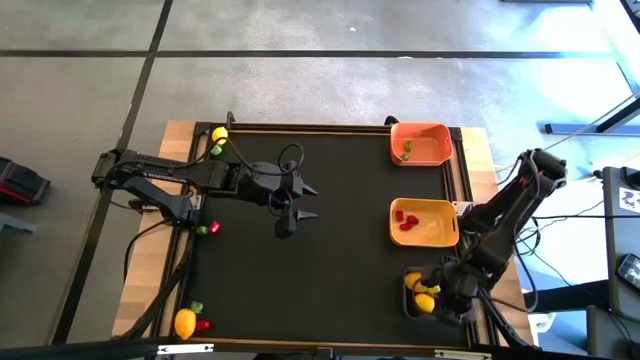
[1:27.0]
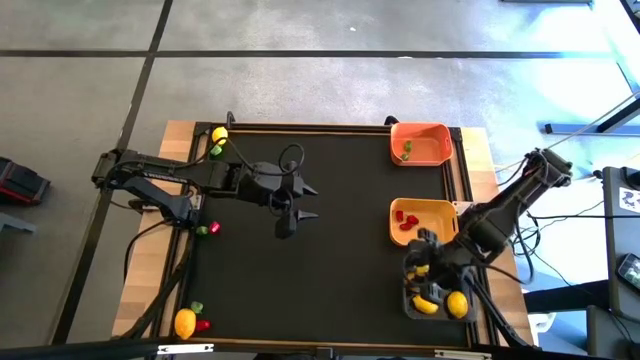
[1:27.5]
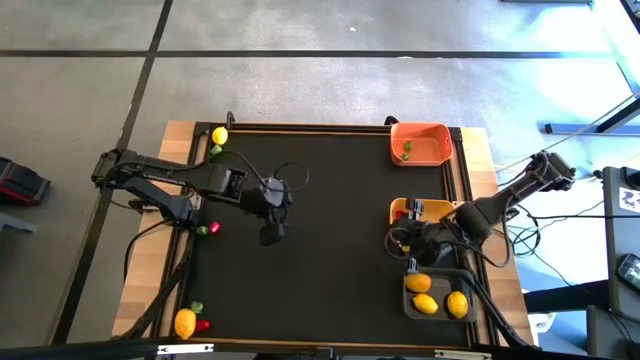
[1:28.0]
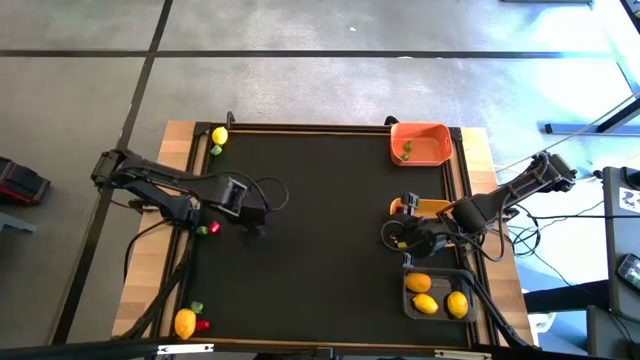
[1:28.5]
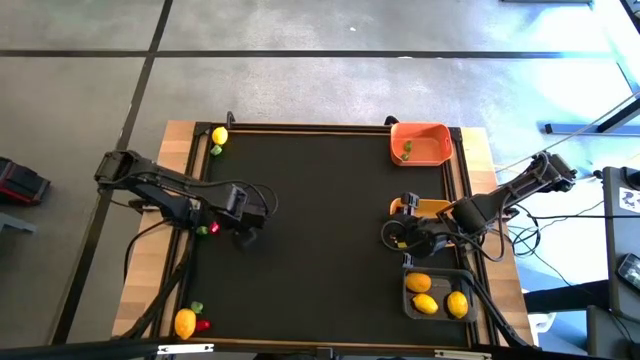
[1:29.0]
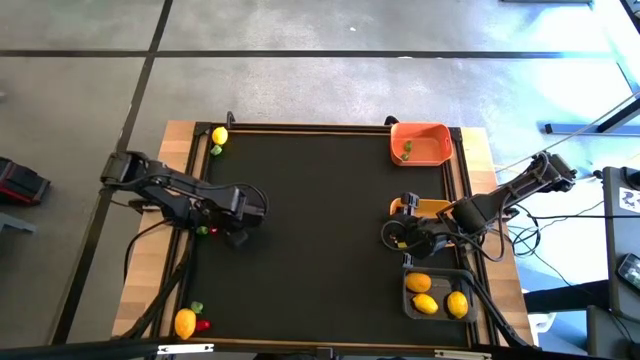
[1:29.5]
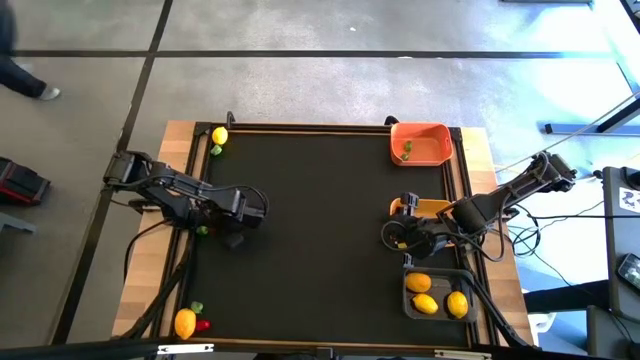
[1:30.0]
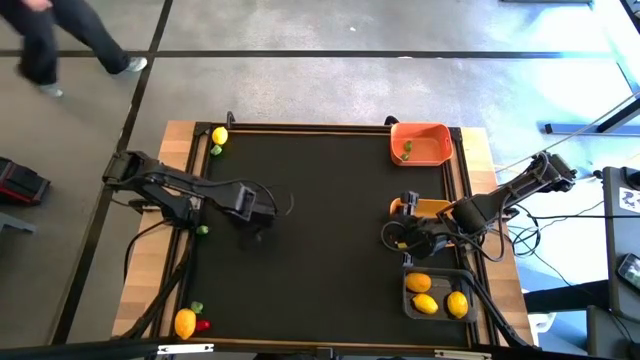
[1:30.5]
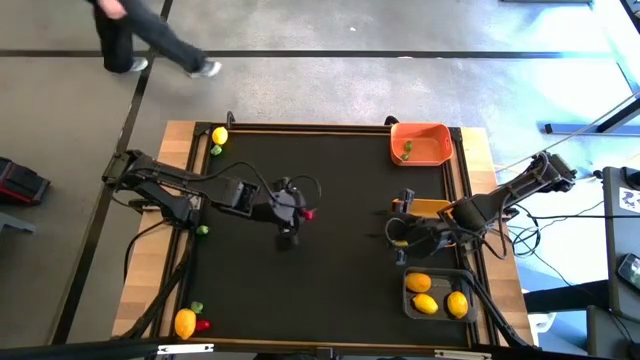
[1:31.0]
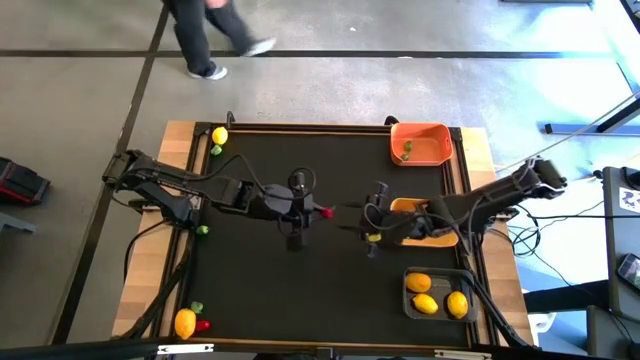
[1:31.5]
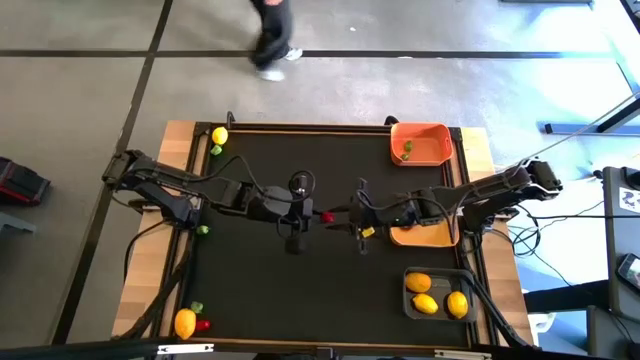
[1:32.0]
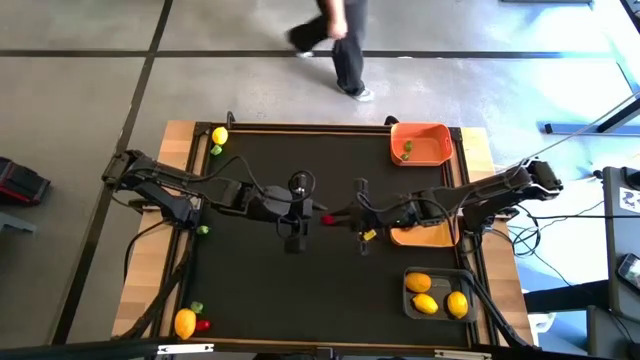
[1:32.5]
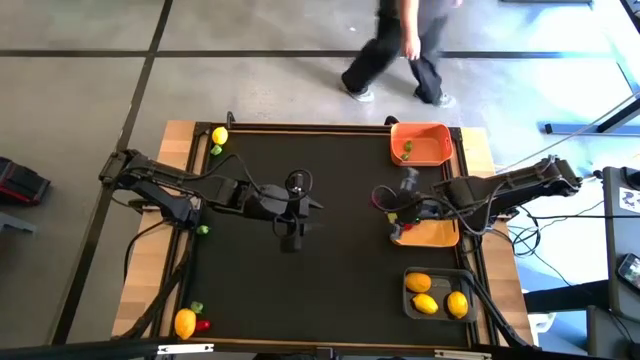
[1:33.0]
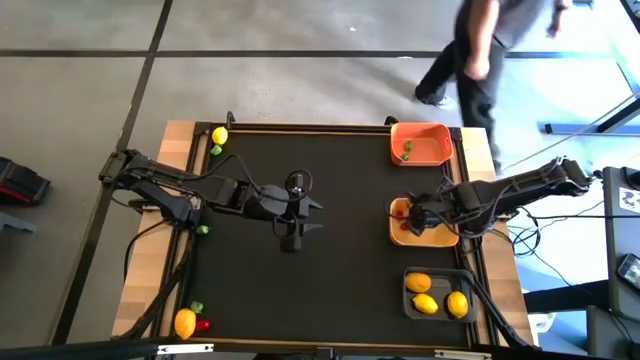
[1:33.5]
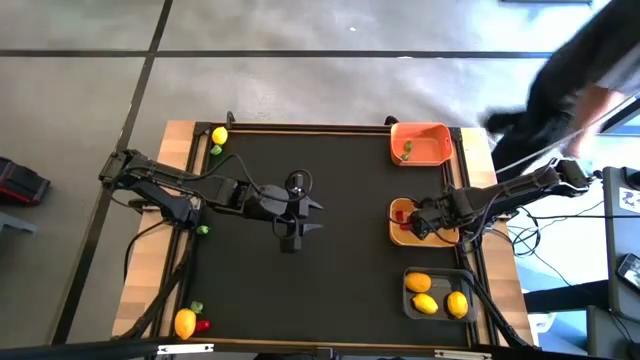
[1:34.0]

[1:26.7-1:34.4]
Task: Sort produce into baskets
Put the top red chili pepper into the yellow bin

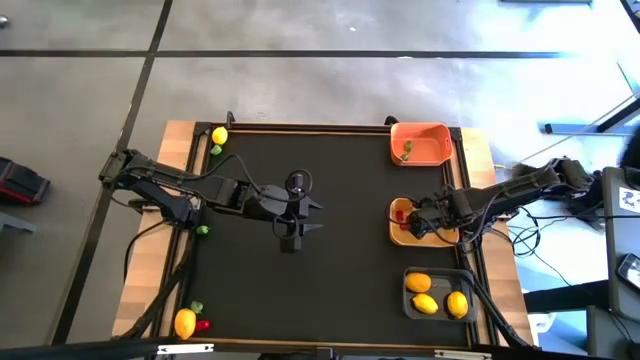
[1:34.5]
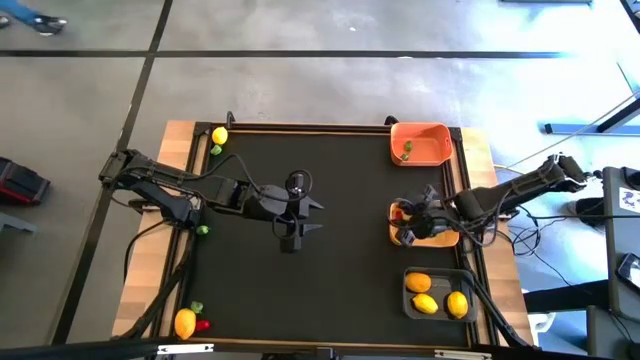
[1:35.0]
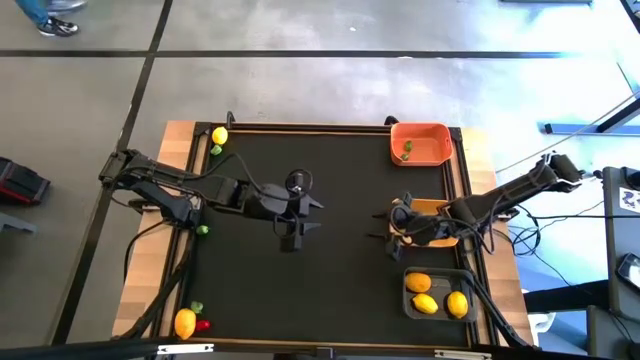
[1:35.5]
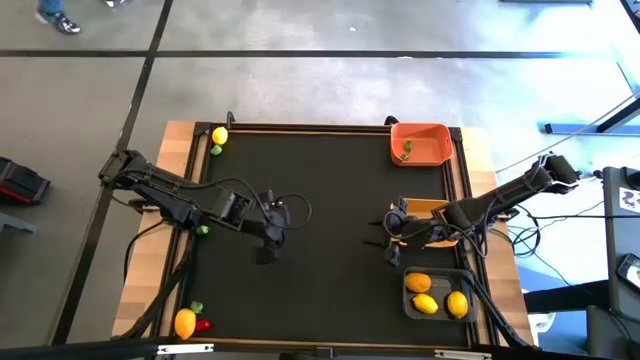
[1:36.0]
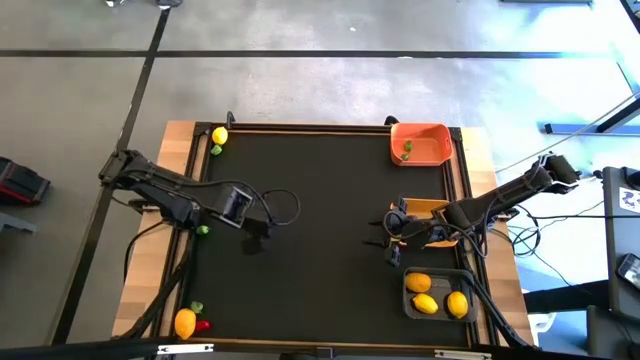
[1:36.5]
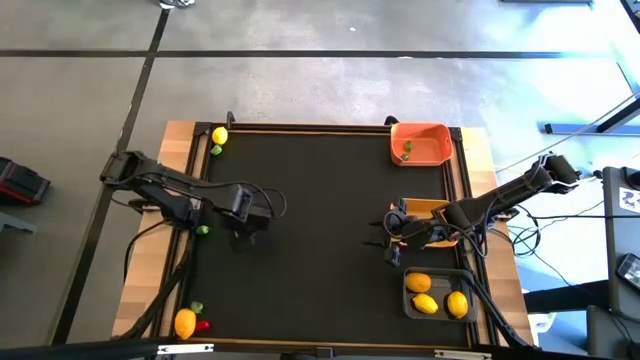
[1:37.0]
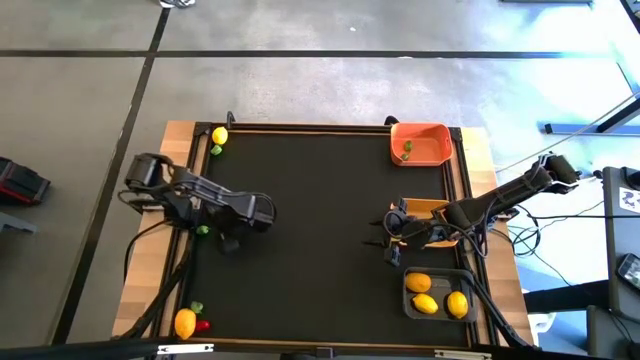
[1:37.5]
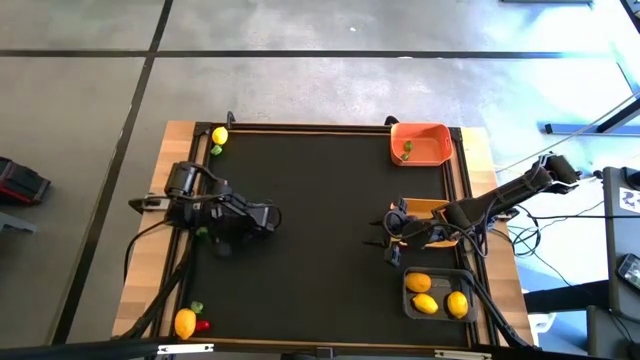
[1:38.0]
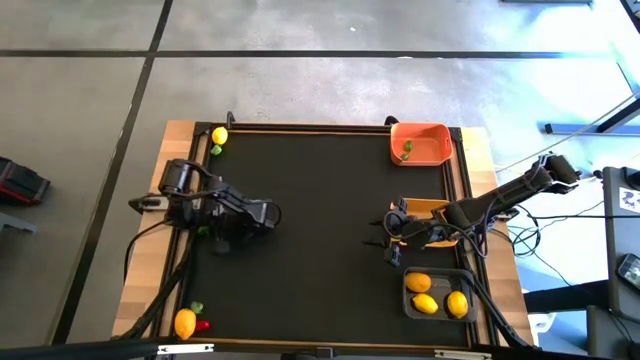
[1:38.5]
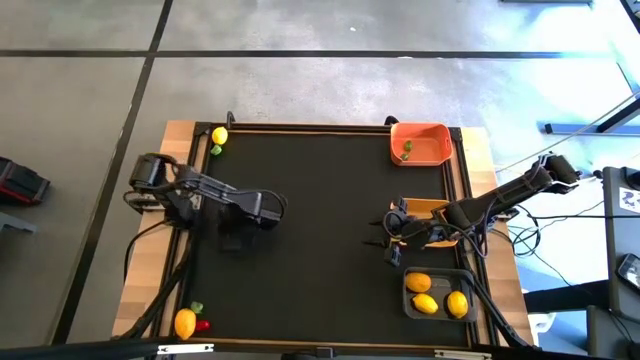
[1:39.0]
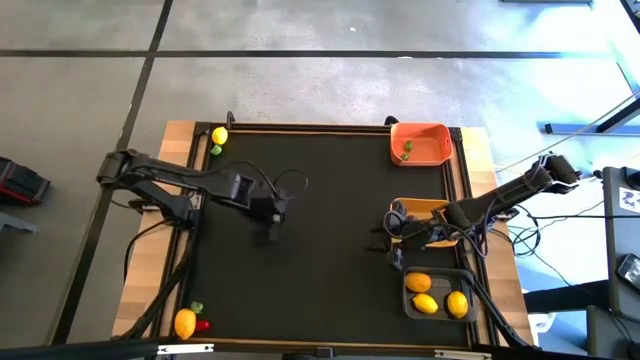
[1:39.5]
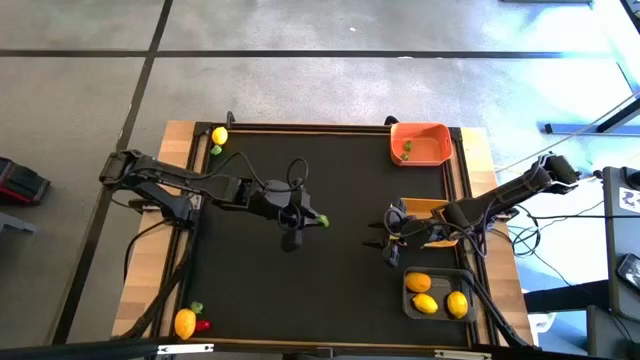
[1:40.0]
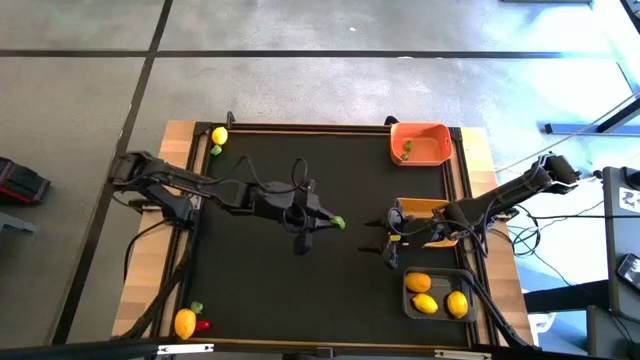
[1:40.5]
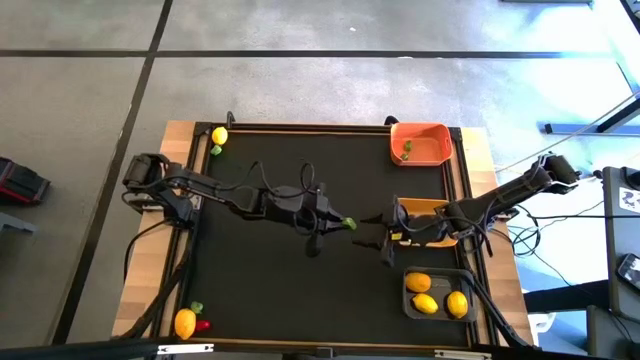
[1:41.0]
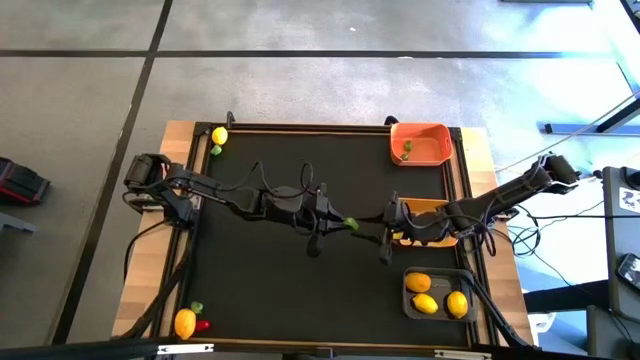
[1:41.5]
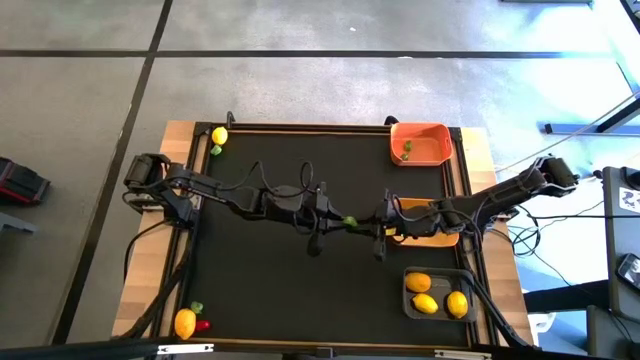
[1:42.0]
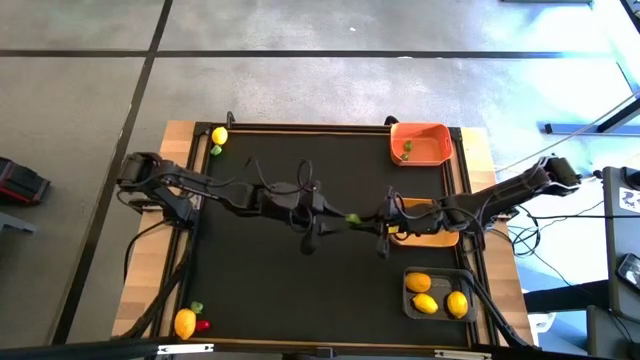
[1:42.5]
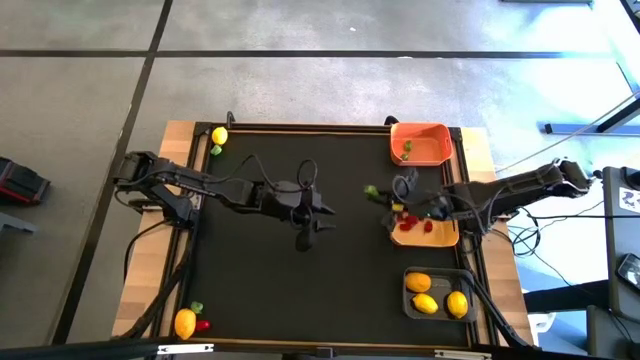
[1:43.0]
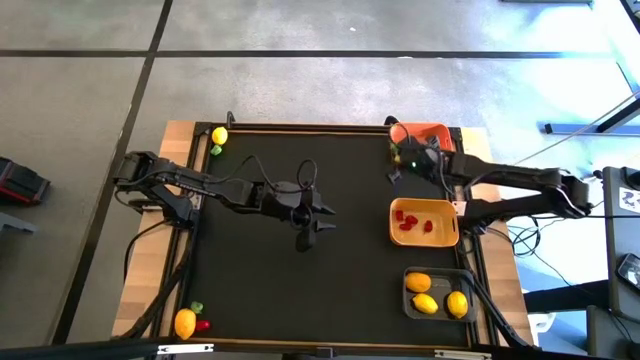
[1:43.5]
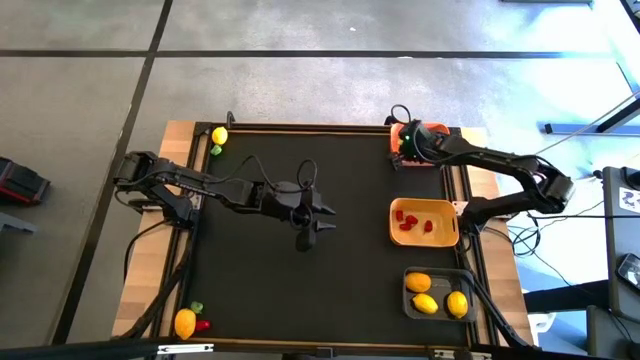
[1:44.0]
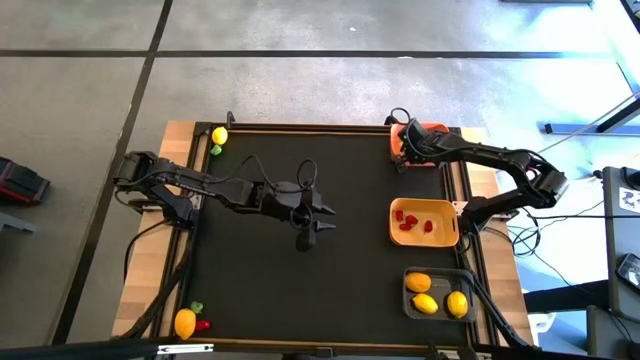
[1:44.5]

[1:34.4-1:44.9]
Put the center green chili pepper into the orange bin

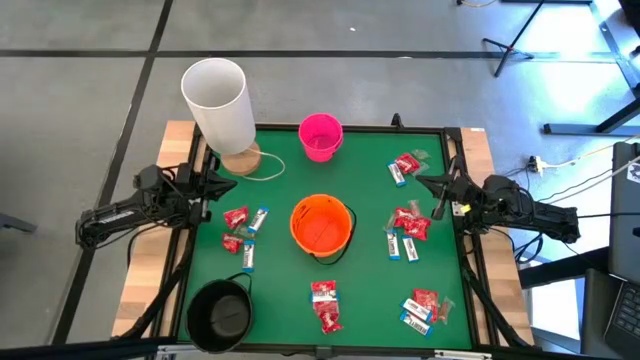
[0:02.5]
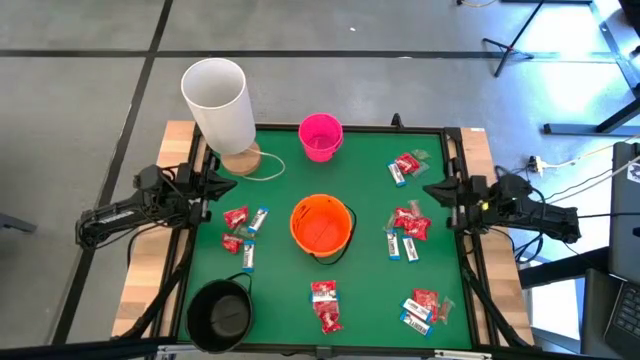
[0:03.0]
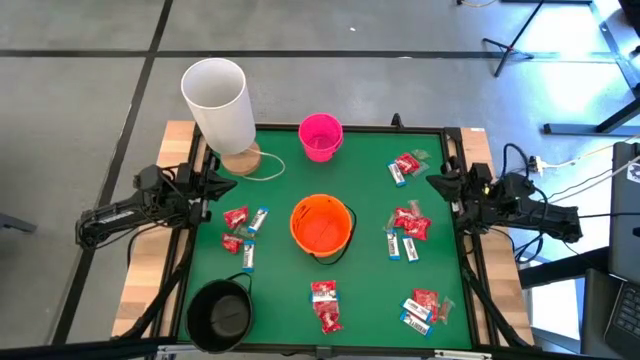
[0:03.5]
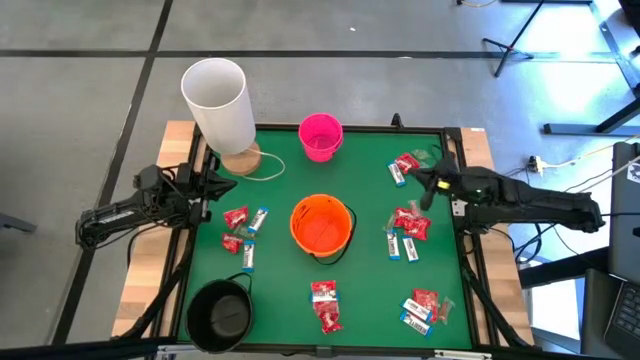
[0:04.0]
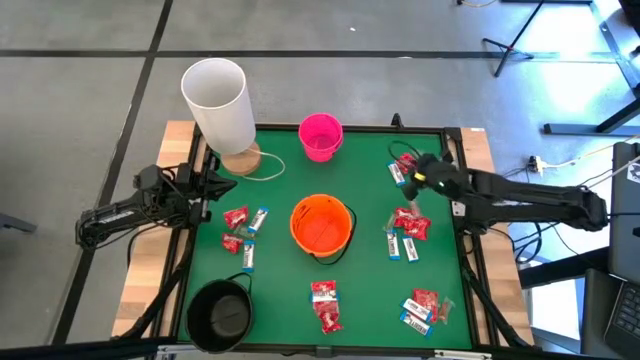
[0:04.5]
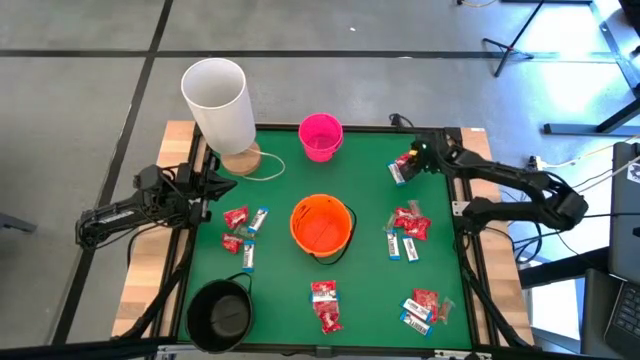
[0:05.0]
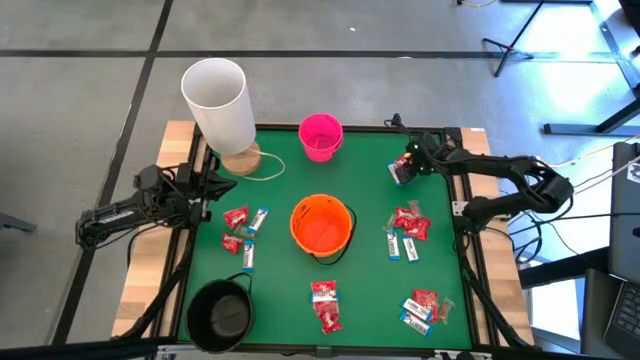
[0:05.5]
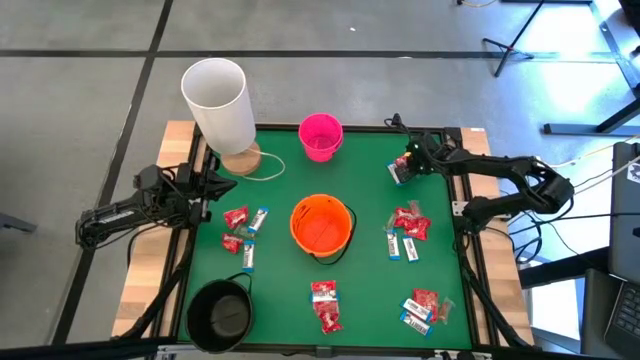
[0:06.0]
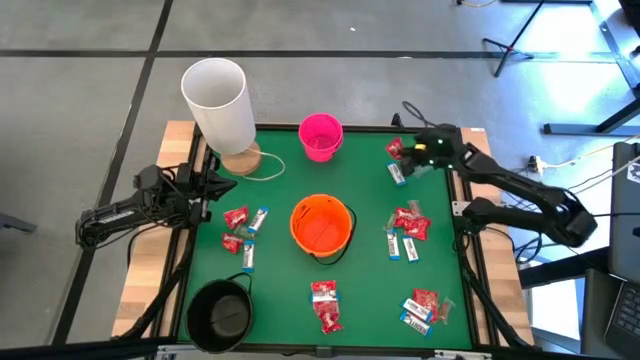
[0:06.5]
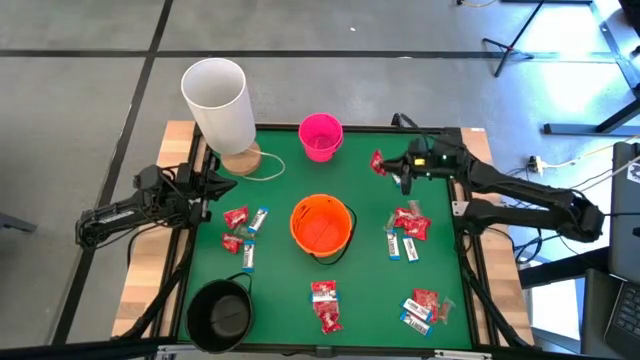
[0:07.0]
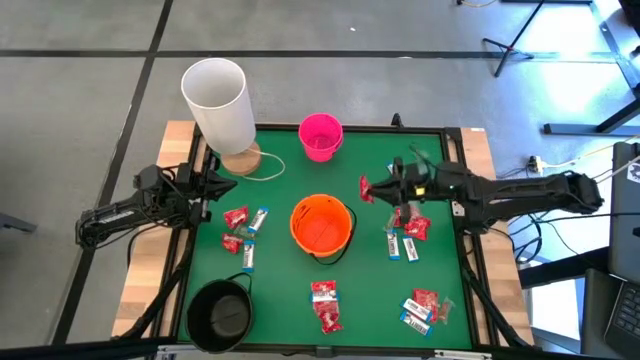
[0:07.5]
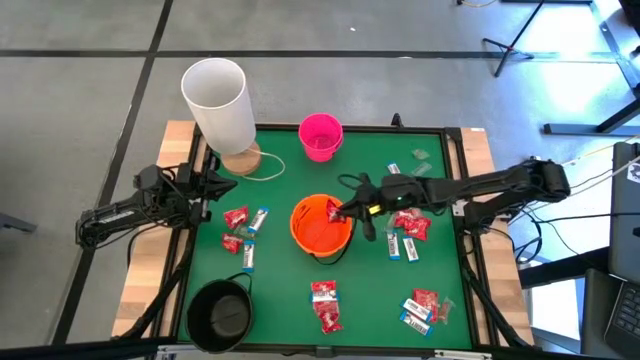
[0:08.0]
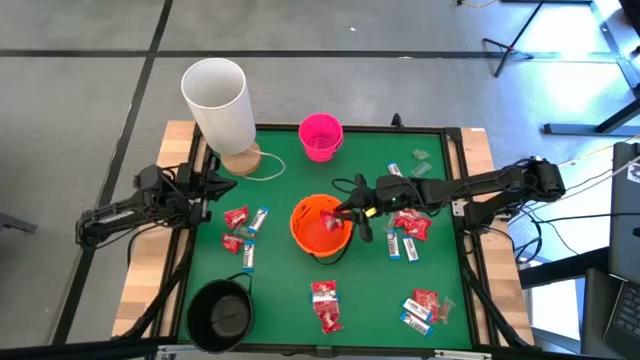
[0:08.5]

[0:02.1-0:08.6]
Task: Sort candy
Put the red candy into the orange bucket
